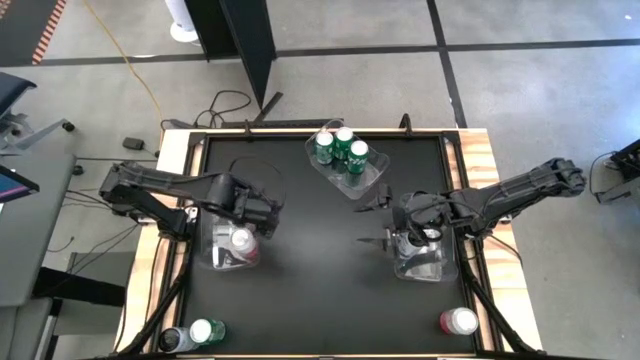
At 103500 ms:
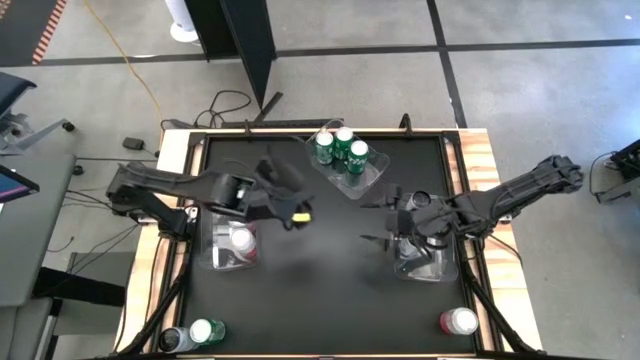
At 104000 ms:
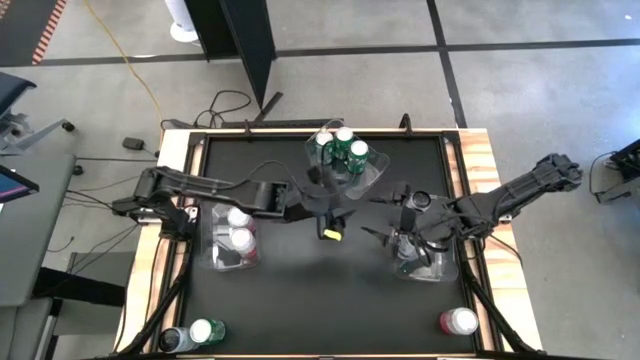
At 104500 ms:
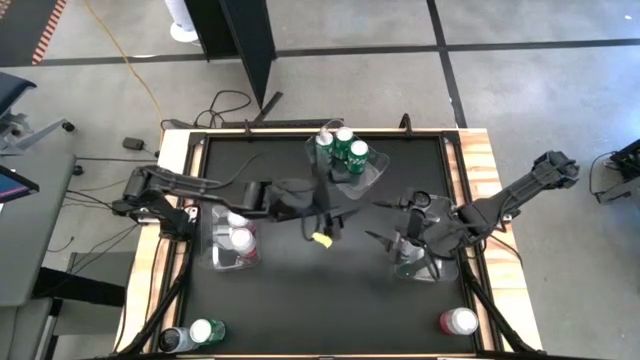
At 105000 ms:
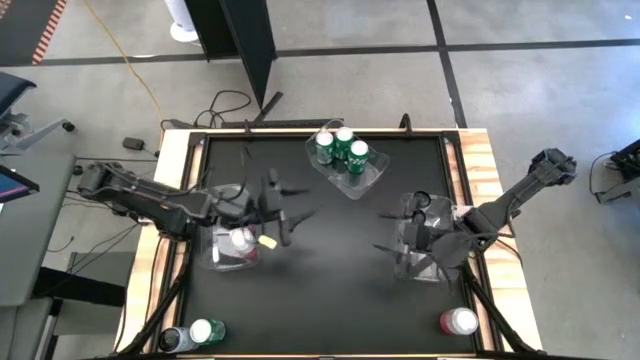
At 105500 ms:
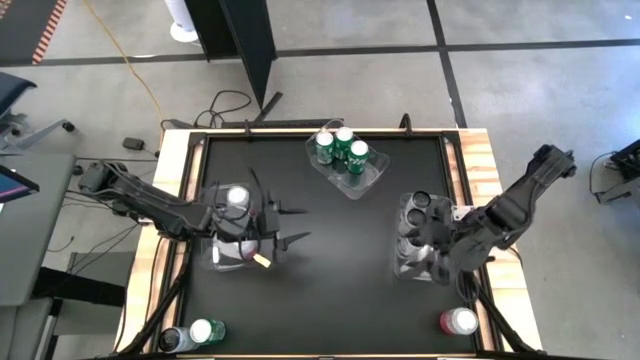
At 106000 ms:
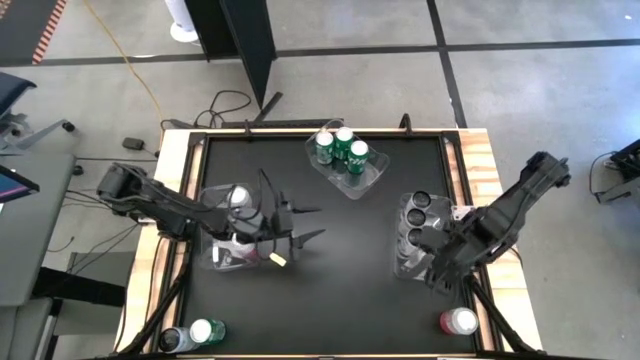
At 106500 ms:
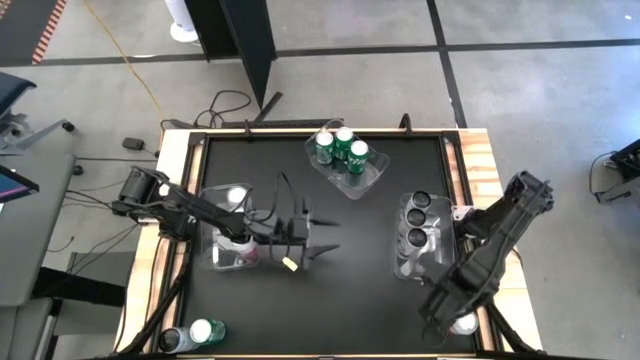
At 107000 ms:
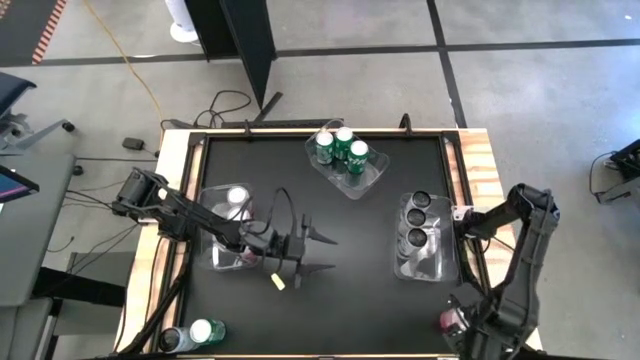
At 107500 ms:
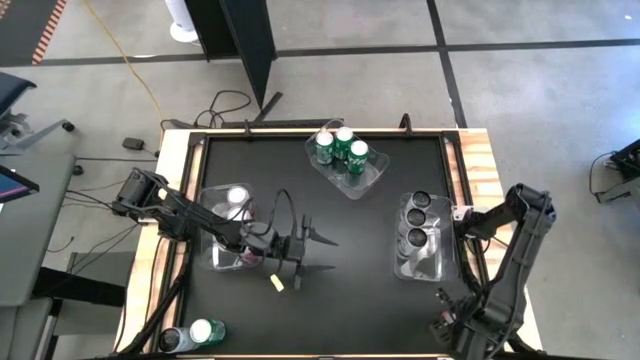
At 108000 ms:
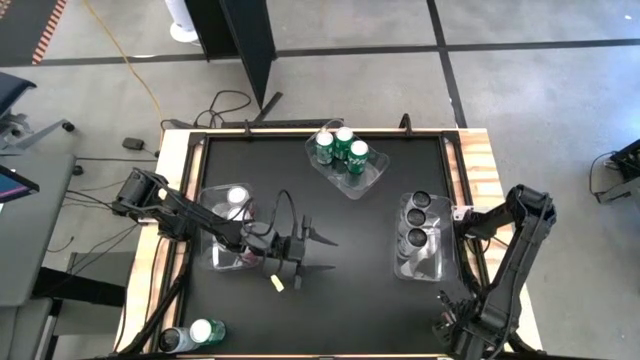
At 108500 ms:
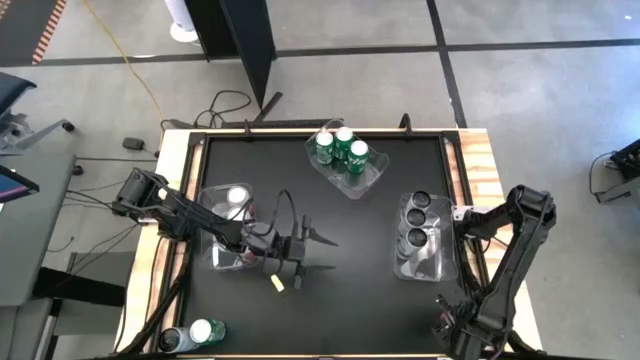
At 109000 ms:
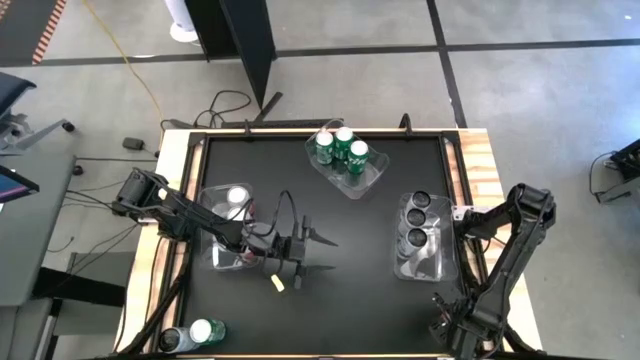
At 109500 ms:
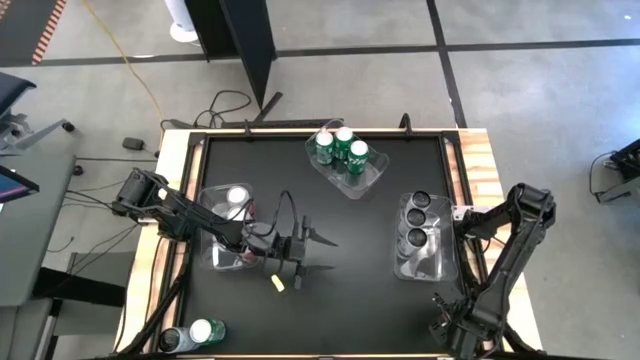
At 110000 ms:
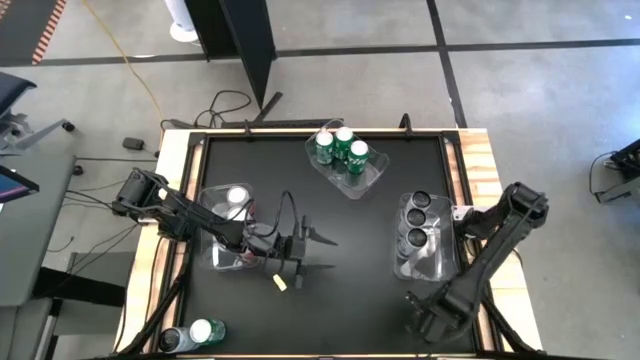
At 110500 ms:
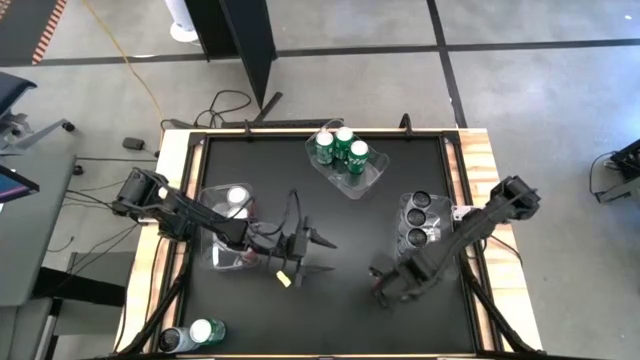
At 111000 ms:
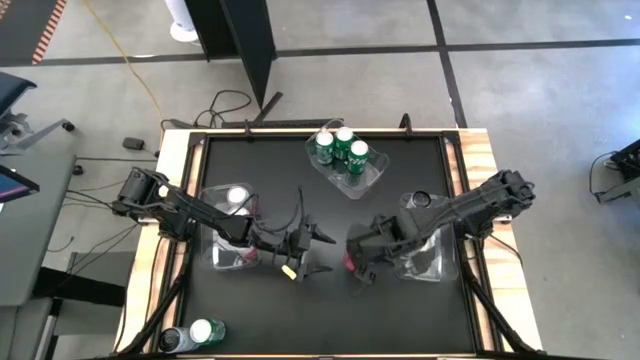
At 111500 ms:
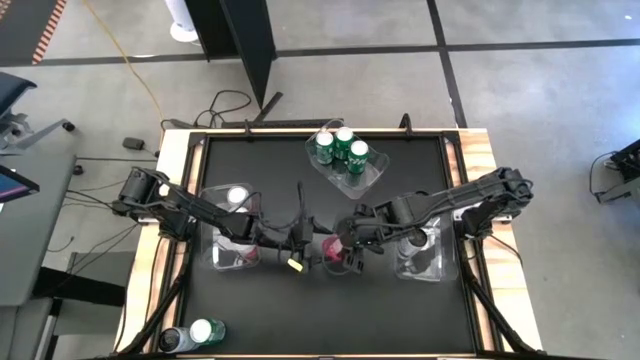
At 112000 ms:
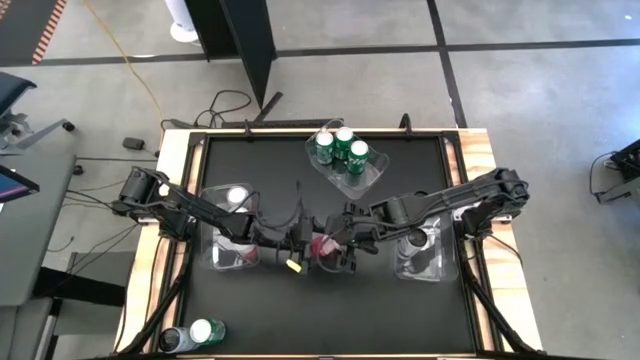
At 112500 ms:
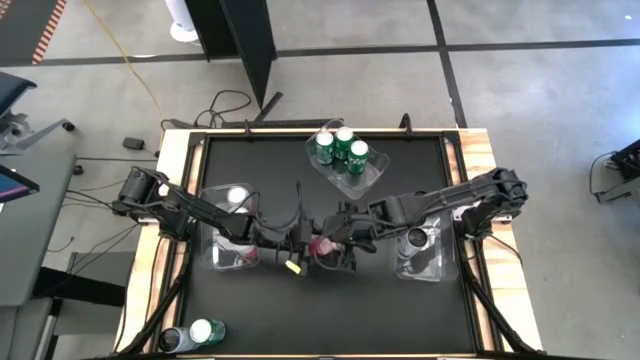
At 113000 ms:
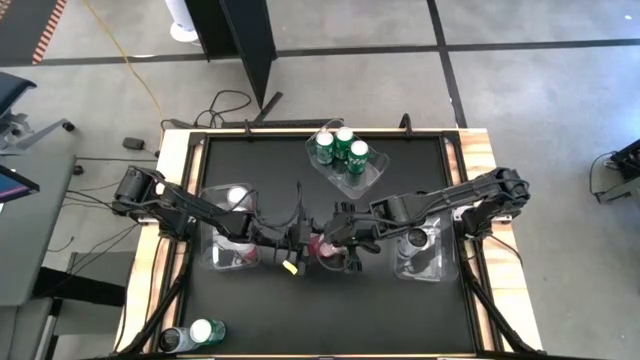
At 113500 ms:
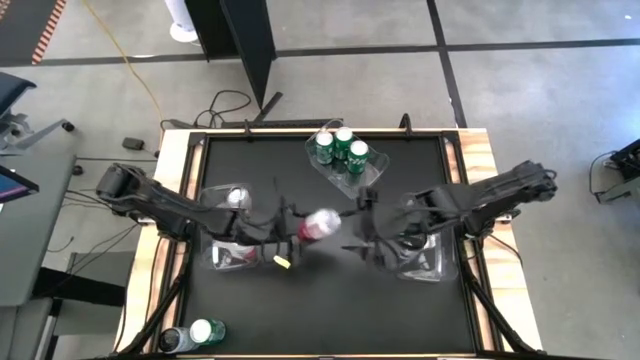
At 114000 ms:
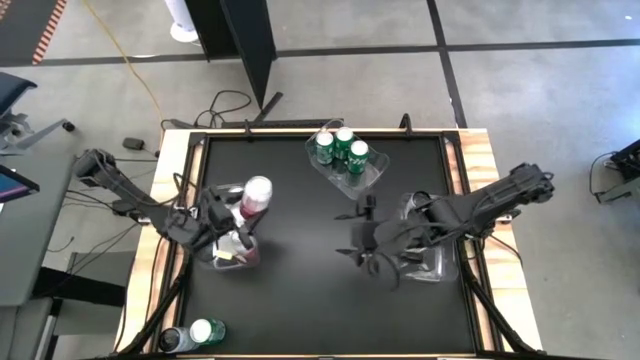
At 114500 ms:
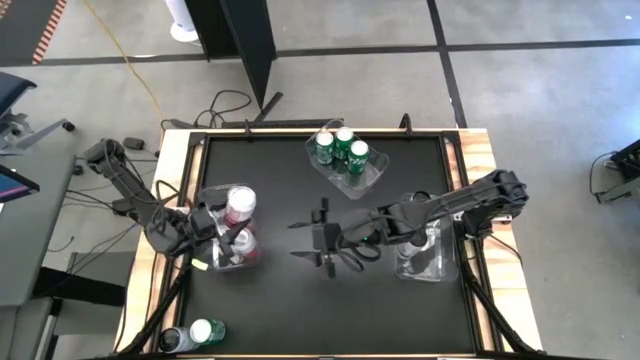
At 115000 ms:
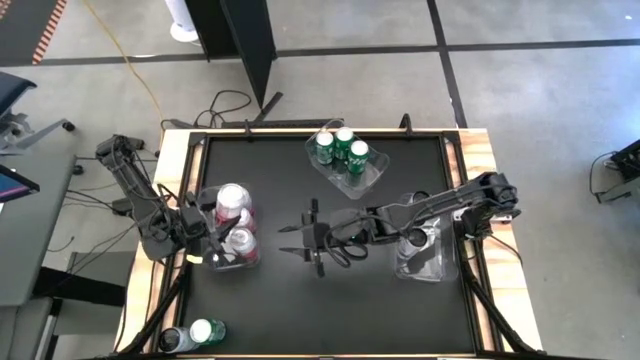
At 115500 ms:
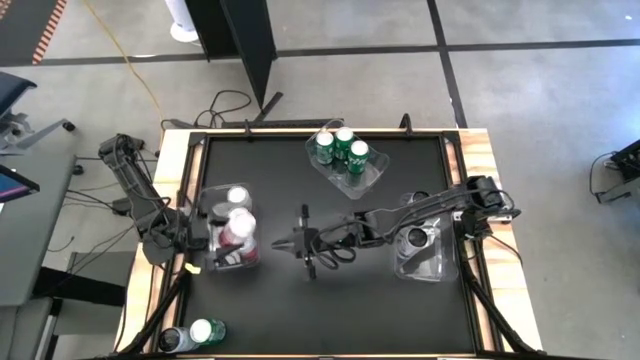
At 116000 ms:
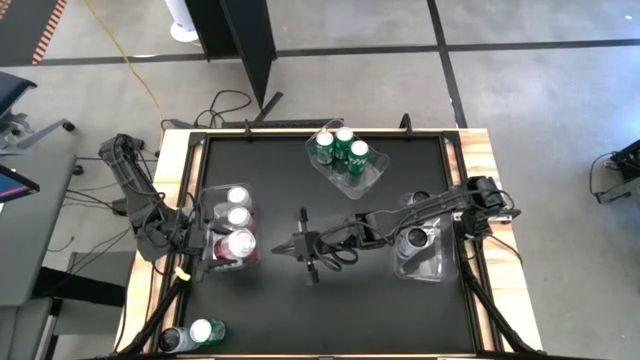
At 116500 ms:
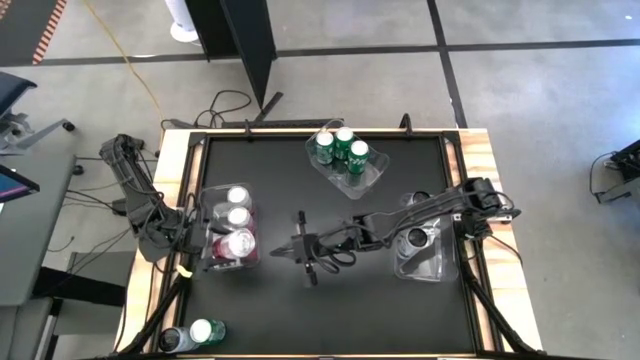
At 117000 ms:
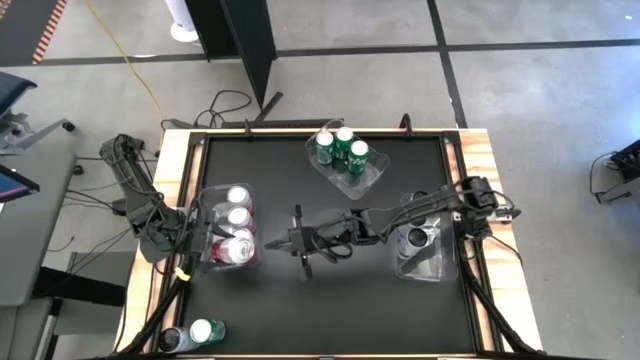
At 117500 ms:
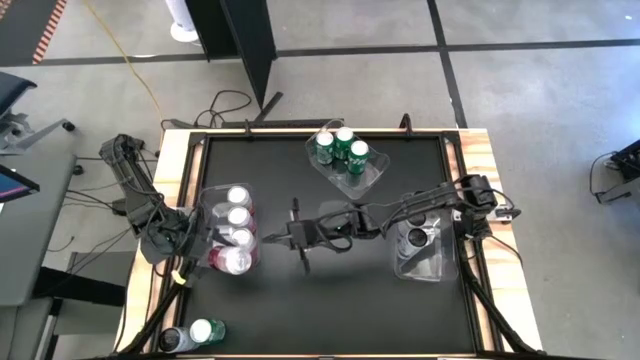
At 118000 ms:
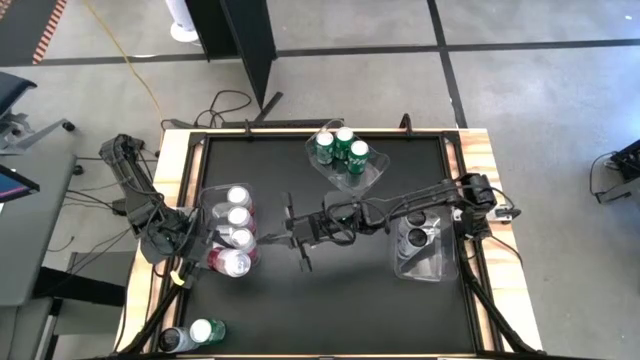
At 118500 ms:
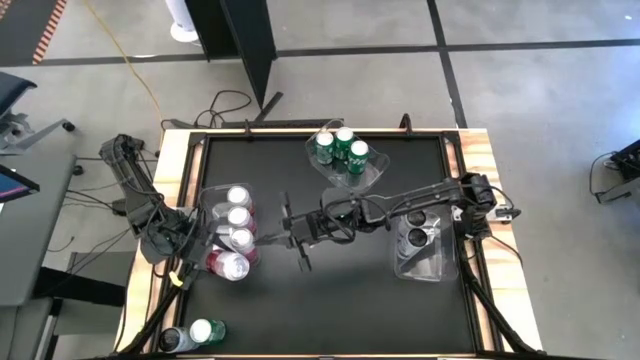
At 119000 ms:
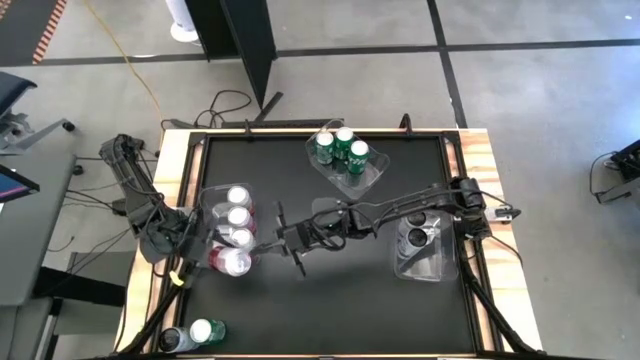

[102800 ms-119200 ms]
Task: Sort soda cans
Put the pink white soda can into the left transparent bin

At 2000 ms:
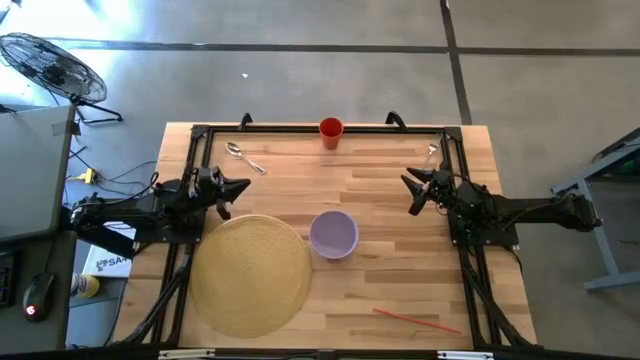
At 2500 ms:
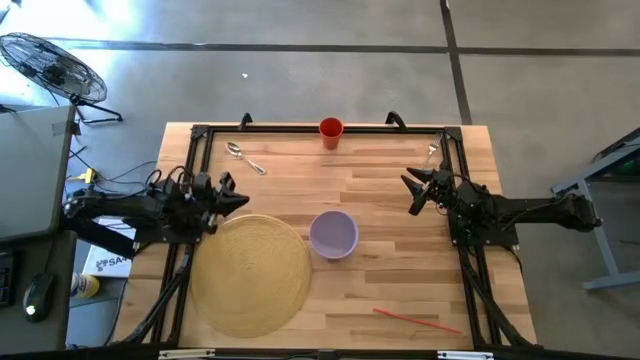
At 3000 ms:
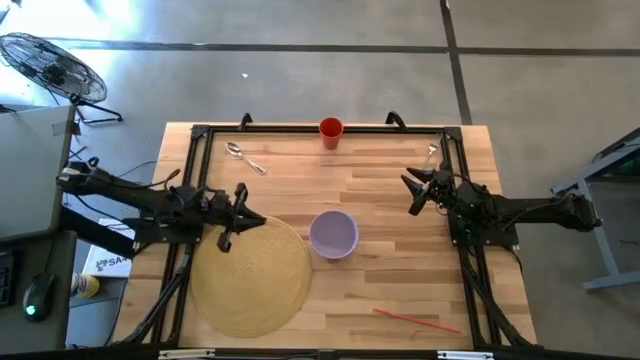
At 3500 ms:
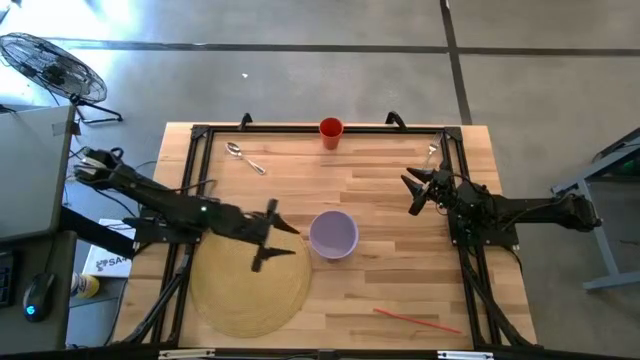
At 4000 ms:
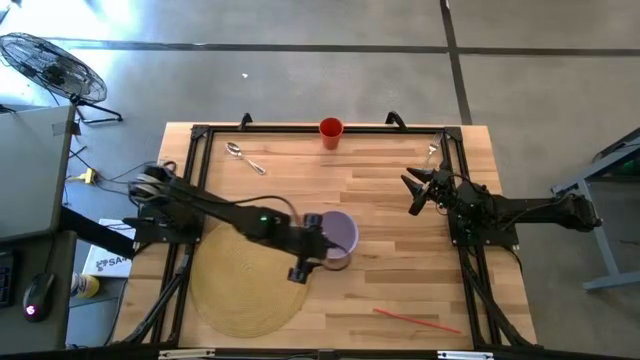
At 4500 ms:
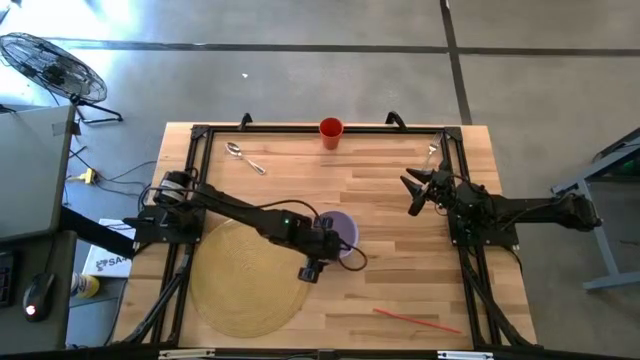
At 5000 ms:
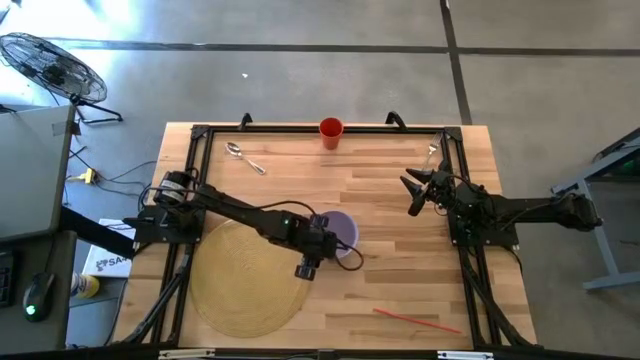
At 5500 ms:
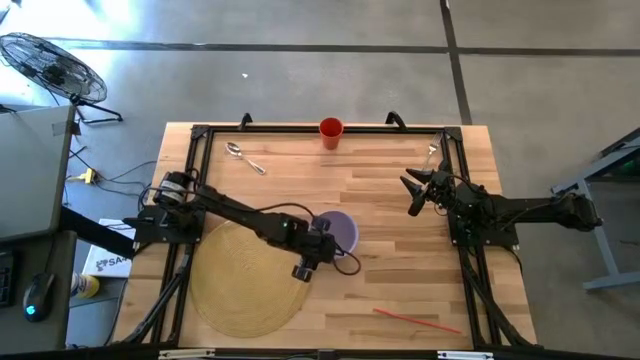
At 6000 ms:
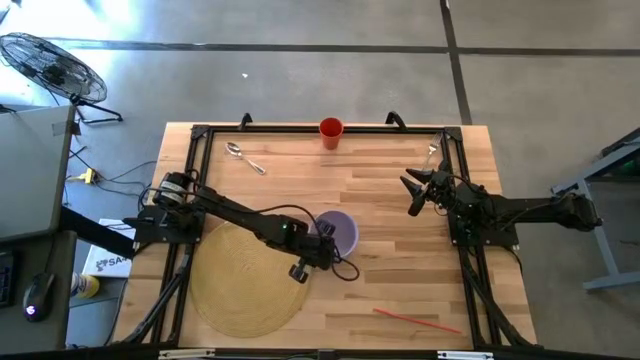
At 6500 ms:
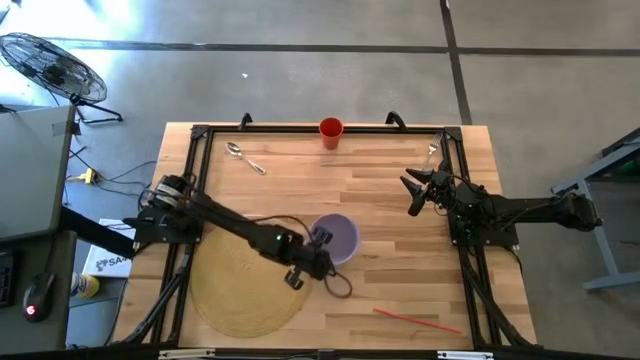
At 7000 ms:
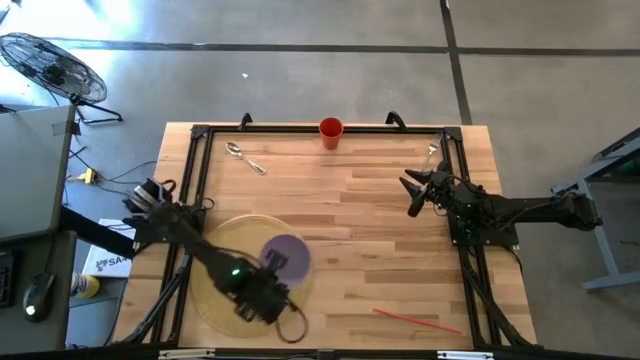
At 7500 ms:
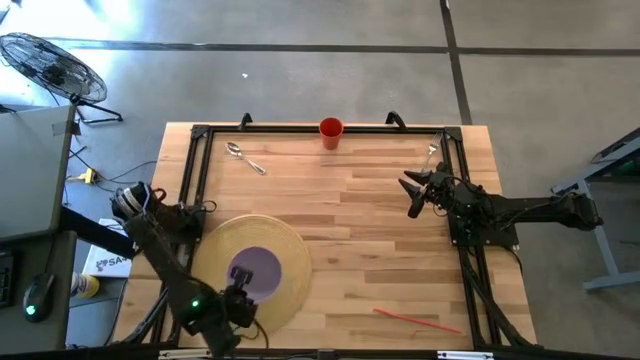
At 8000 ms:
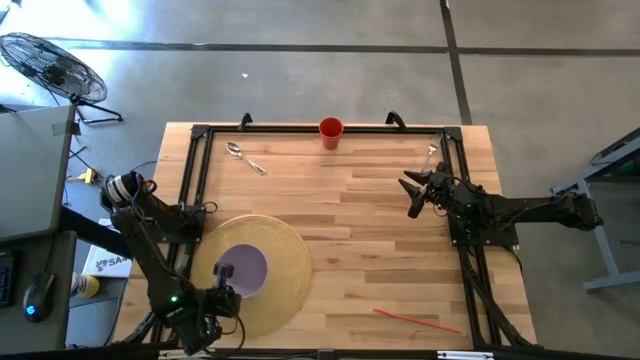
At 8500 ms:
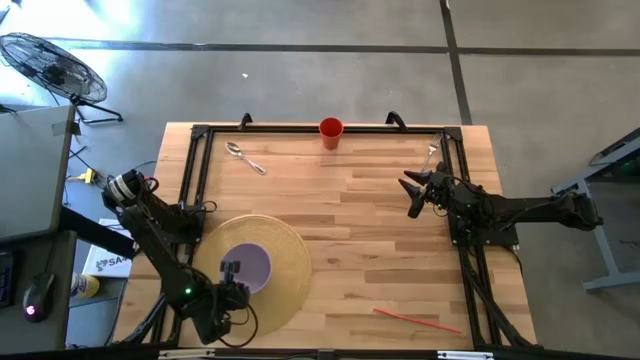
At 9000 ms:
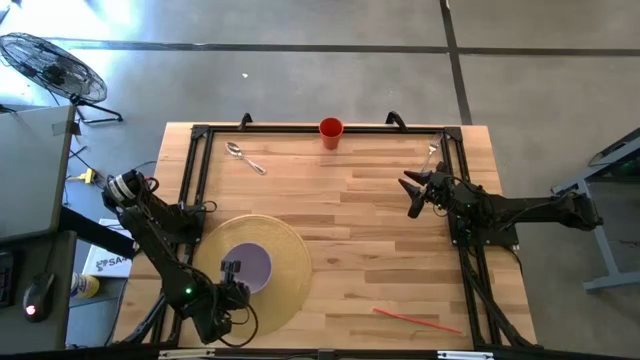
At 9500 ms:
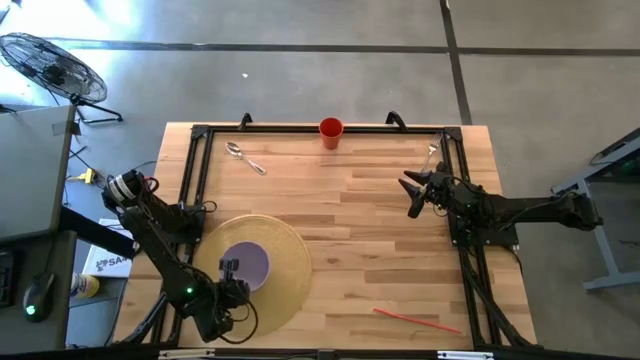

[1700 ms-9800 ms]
Task: Pick & Place Utensil
Put the purple bowl on the brown mat
